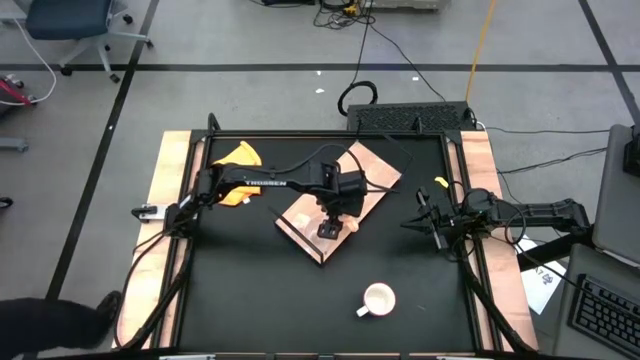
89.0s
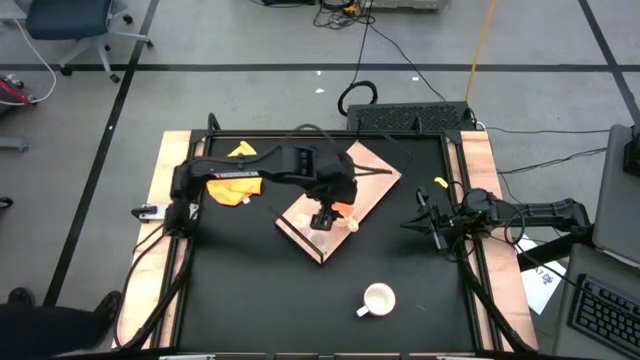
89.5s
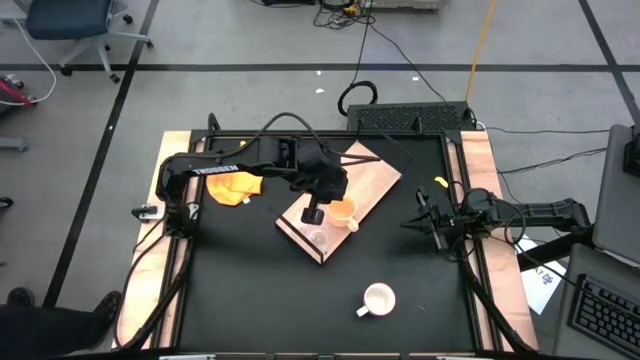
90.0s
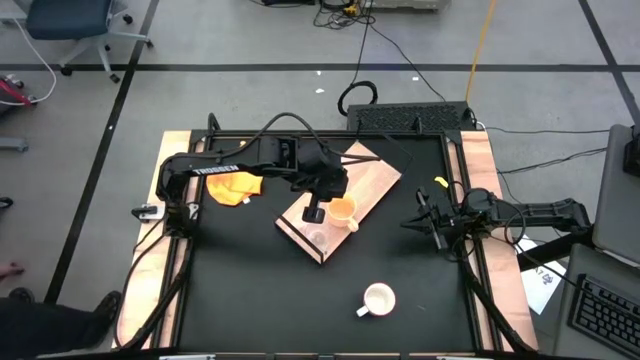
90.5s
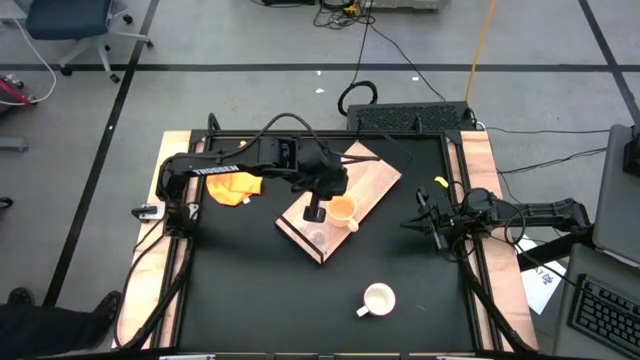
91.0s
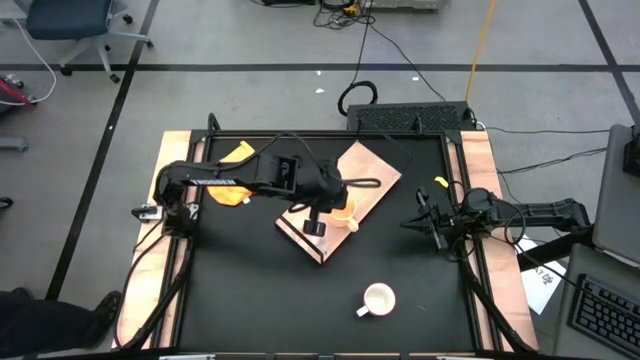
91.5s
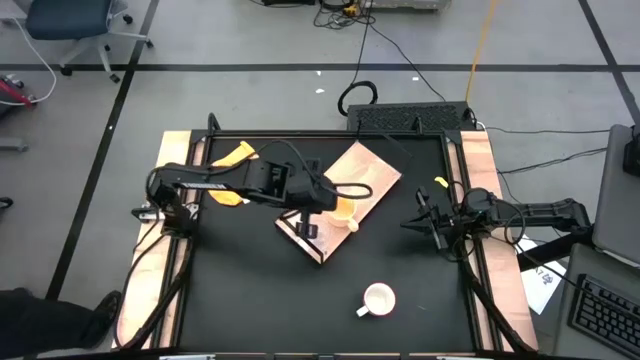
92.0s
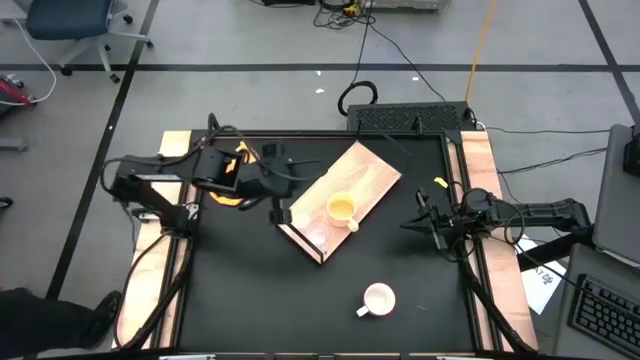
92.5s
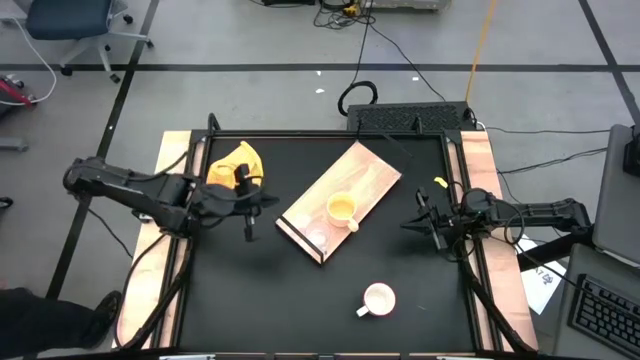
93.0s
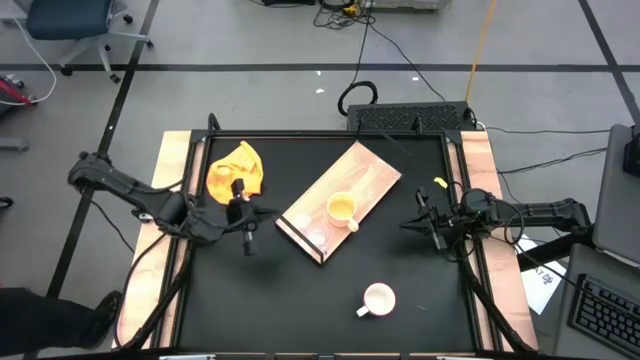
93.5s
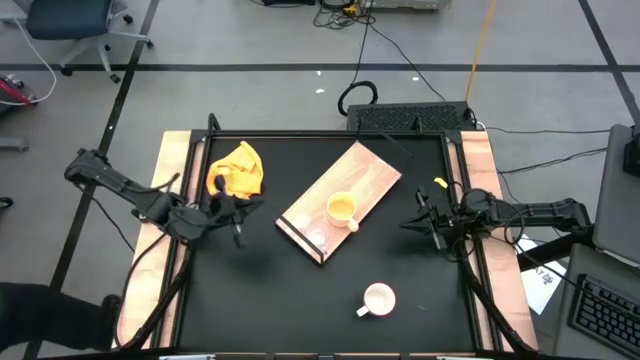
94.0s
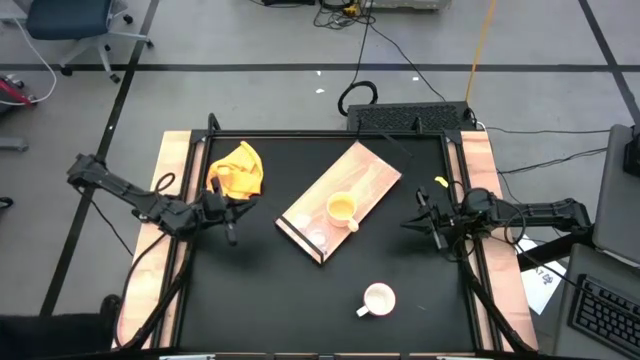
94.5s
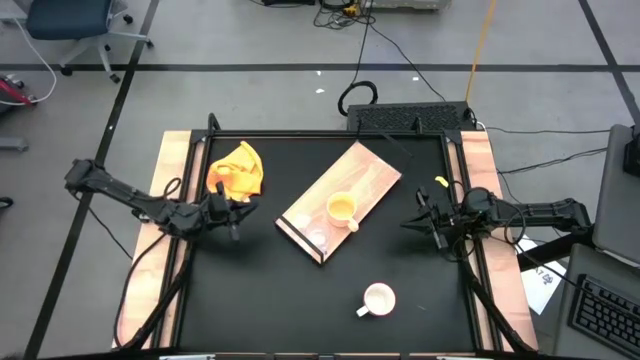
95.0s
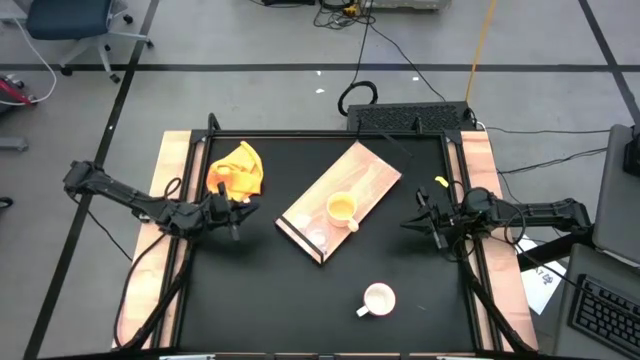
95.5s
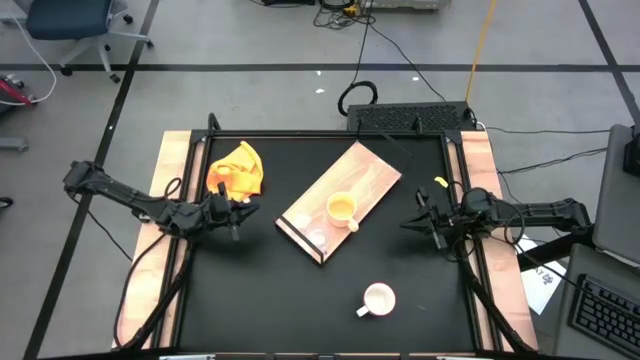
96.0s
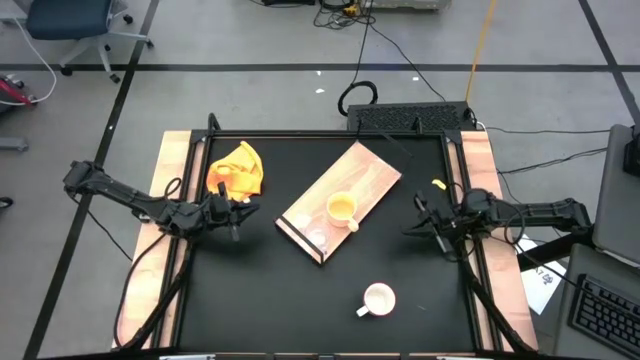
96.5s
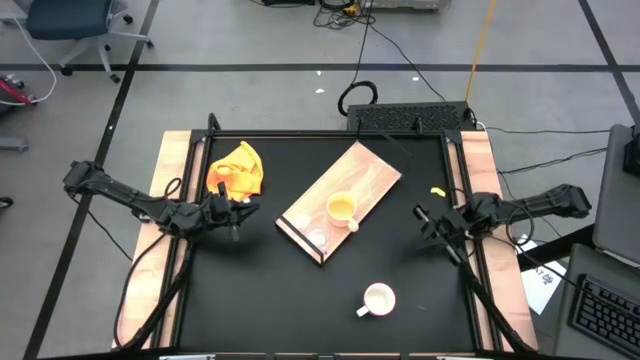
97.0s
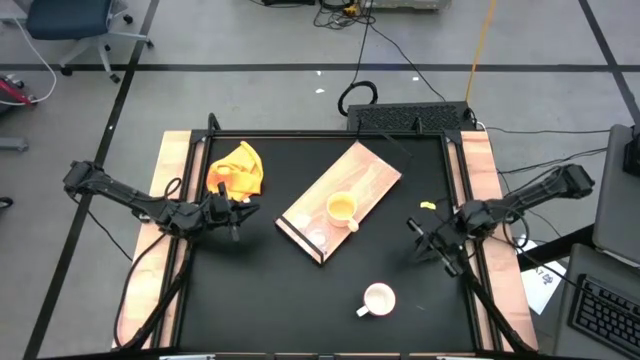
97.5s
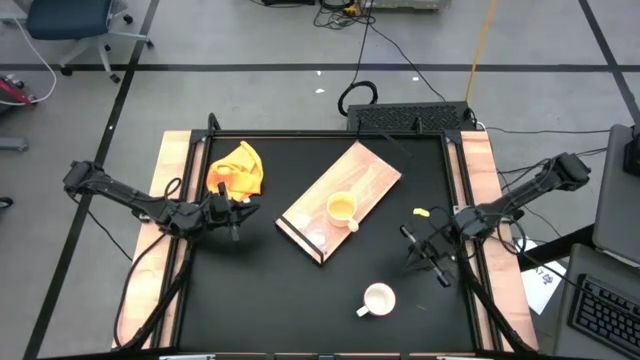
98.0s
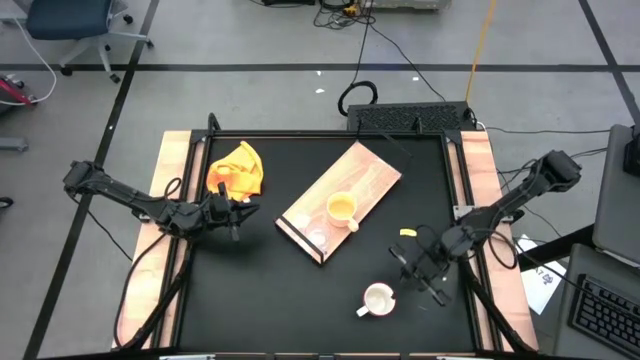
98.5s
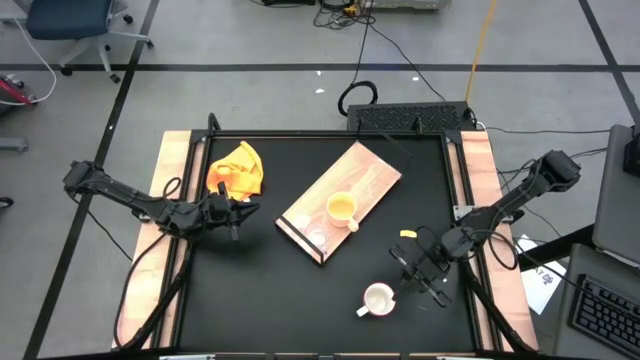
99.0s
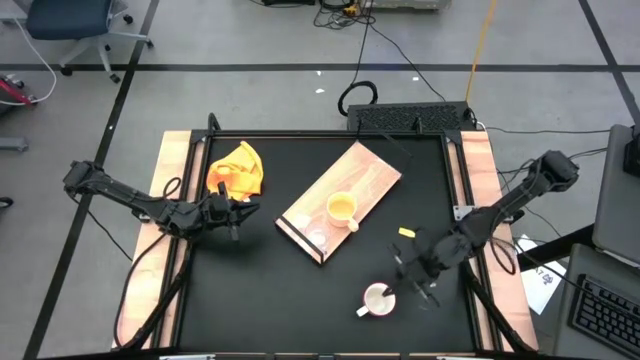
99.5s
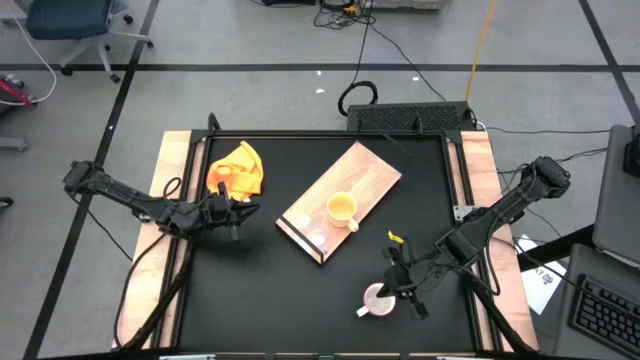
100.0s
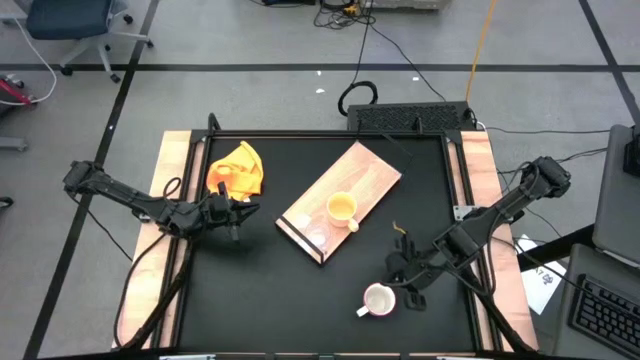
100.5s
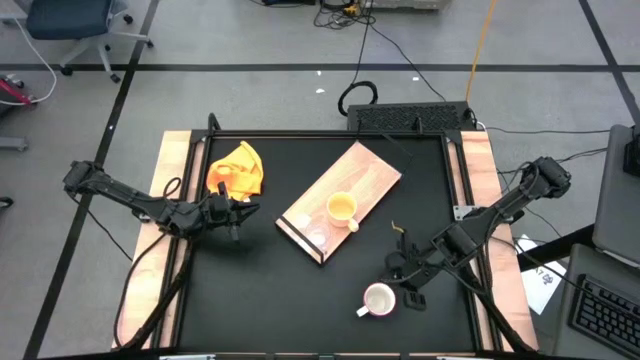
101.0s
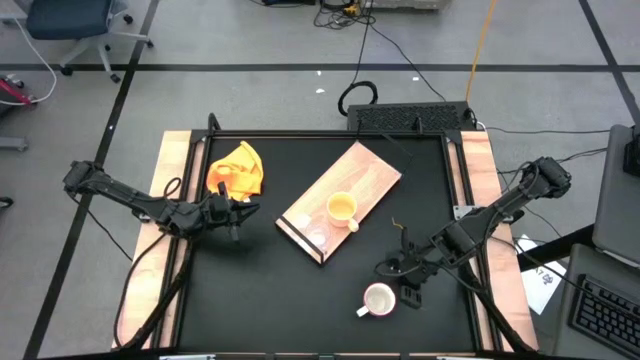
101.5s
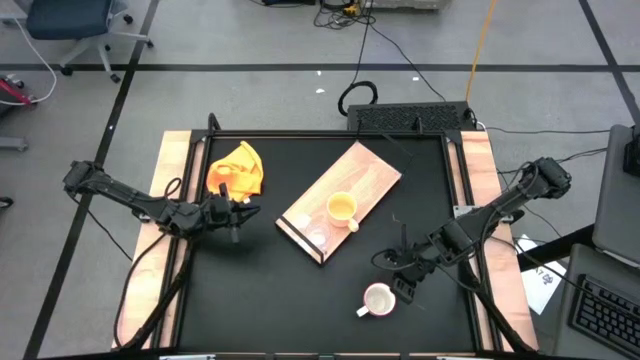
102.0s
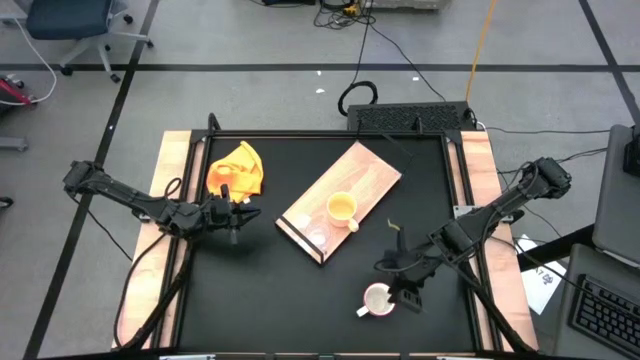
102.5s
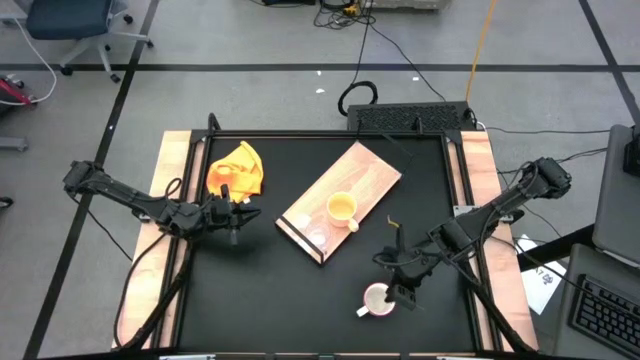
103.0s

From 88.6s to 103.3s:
Task: Stack small to large cups/mugs on shelf
Put the gray mug on the shelf

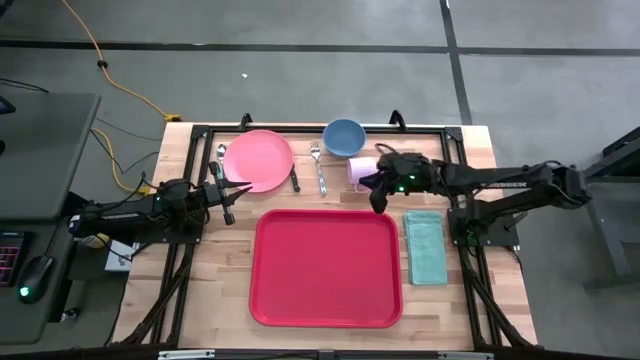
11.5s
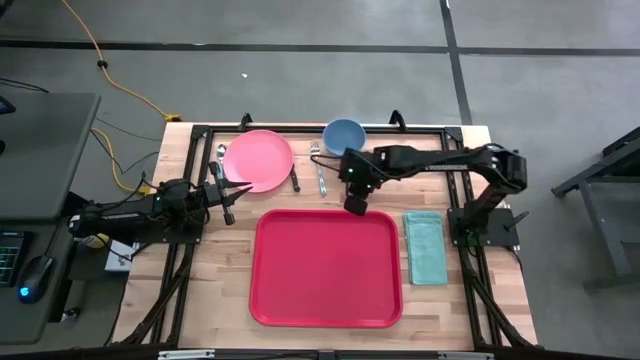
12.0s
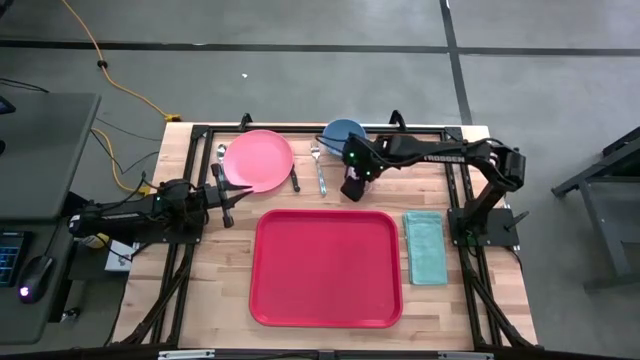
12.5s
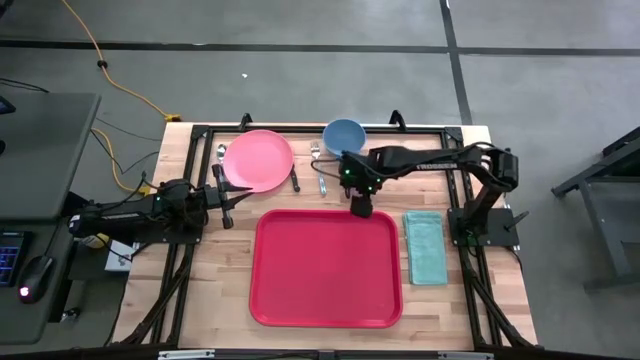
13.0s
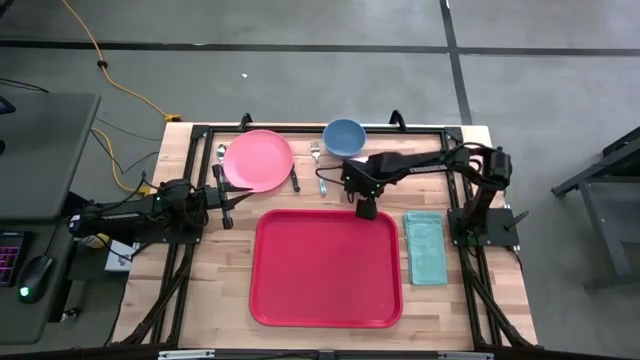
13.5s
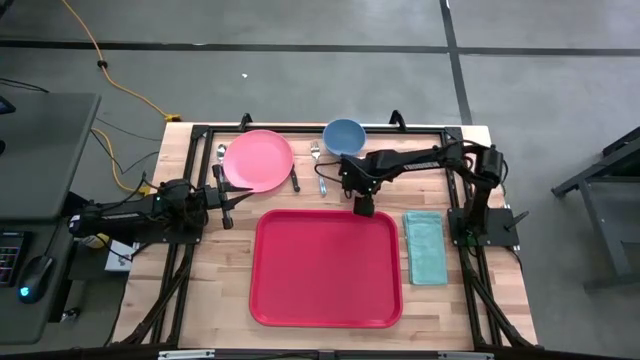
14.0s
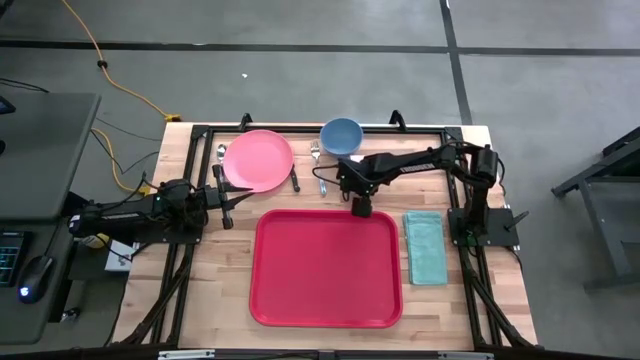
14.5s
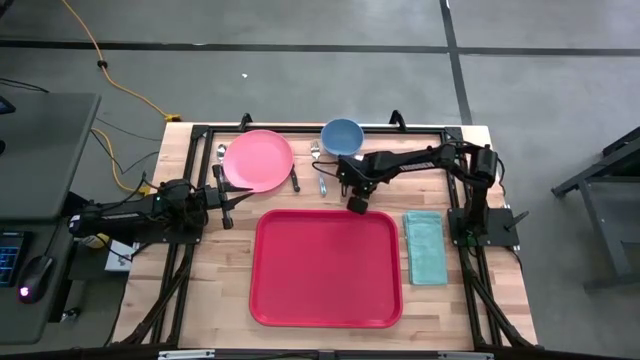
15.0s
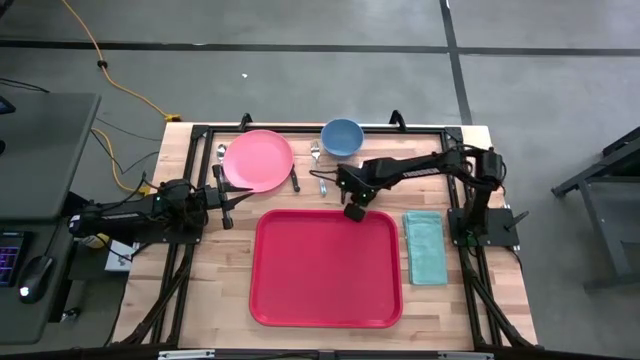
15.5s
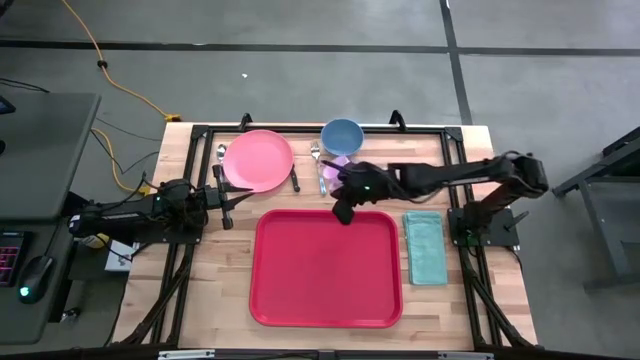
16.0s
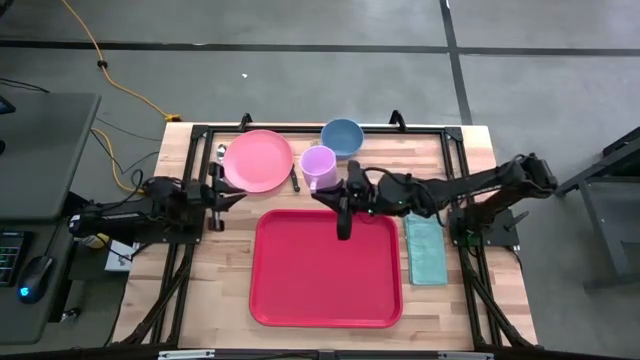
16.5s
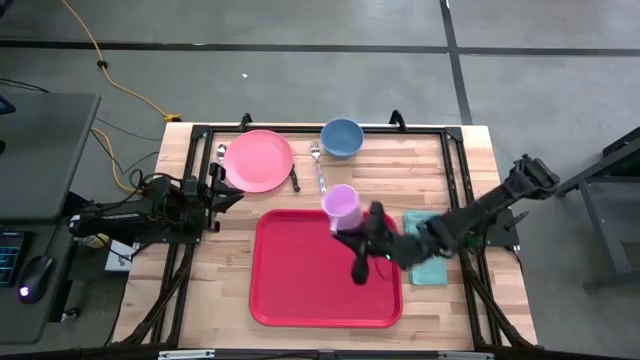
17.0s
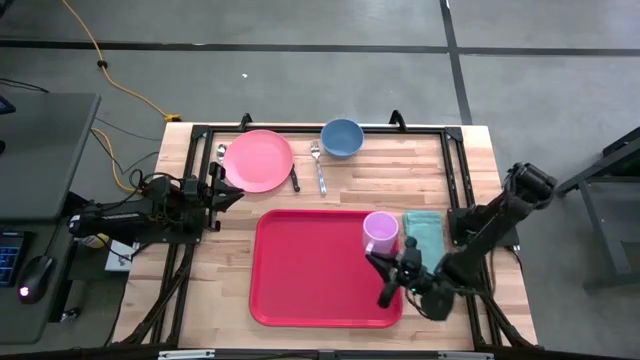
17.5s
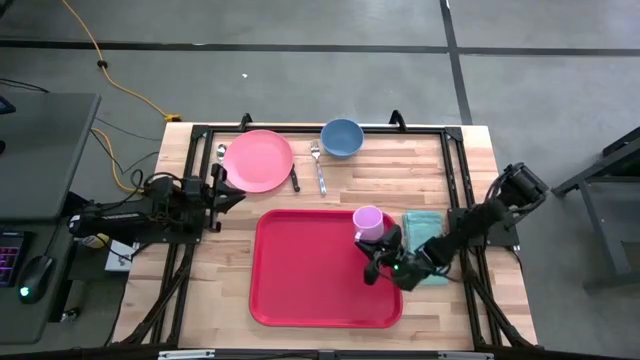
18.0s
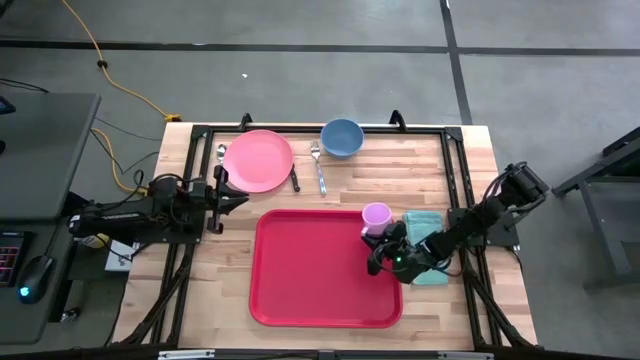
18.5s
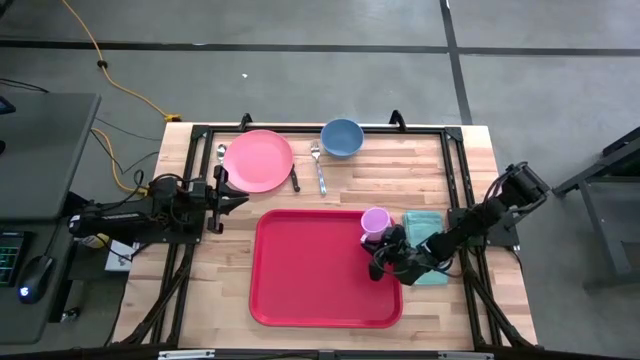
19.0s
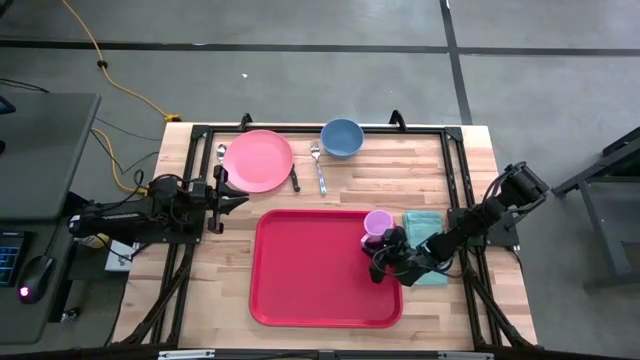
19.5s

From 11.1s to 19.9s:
Task: Set up tray
Put the purple mug on the red tray
